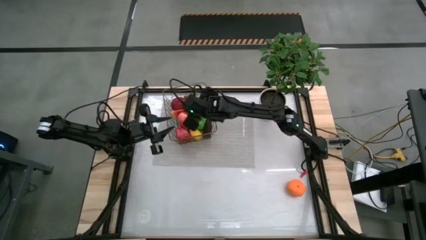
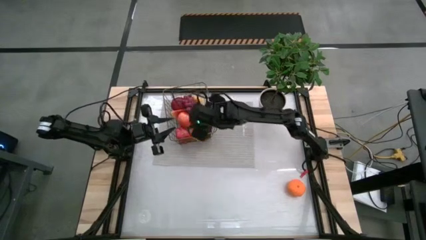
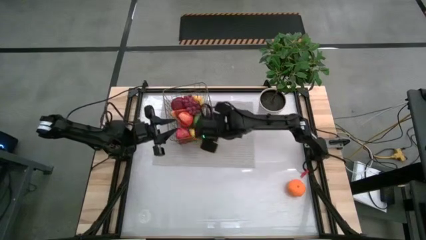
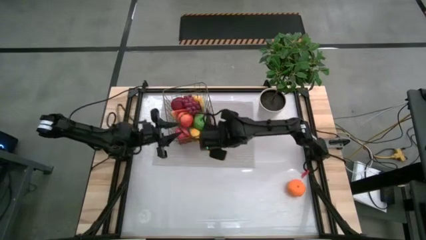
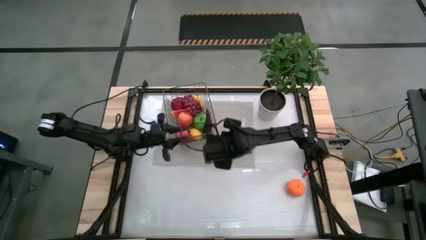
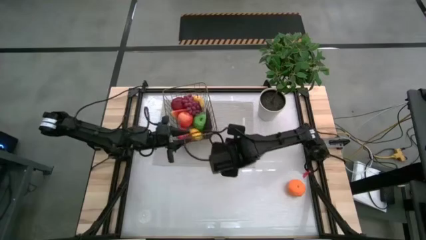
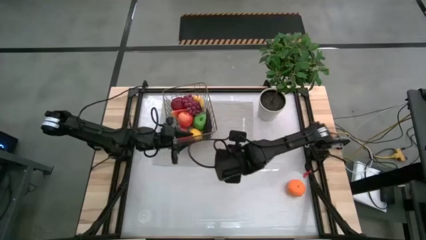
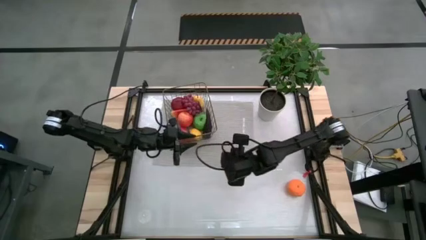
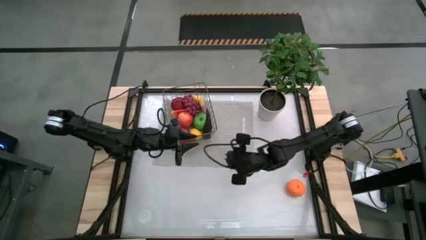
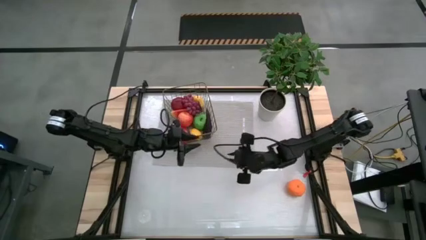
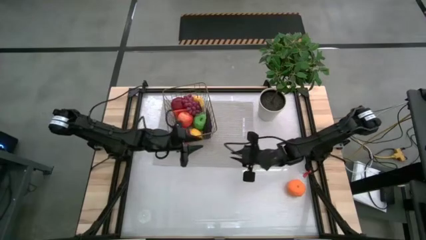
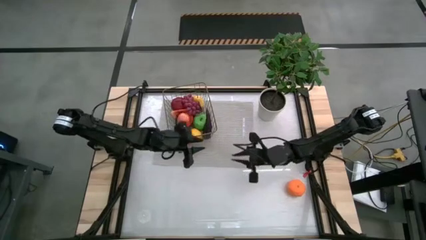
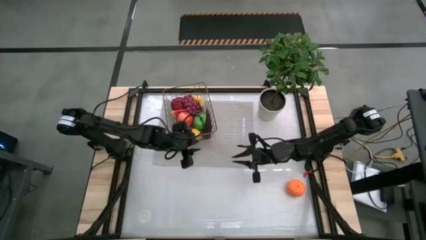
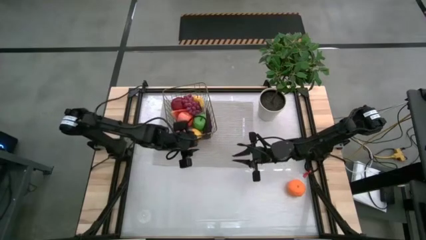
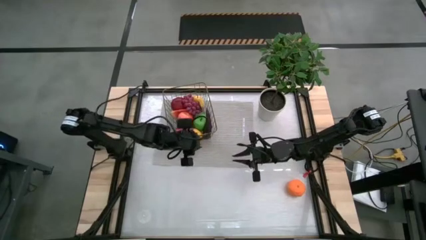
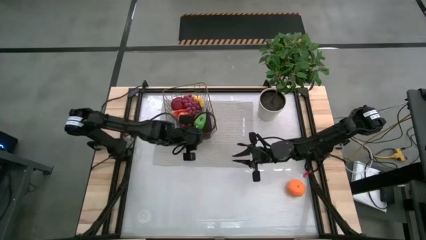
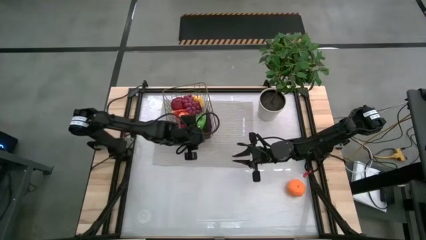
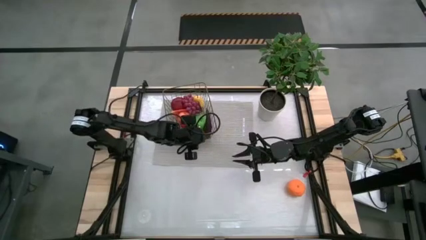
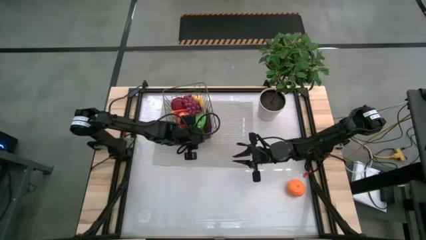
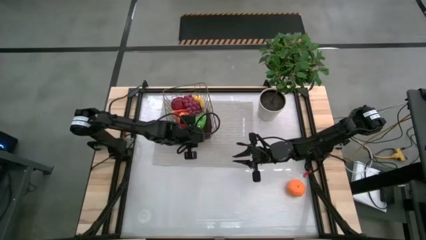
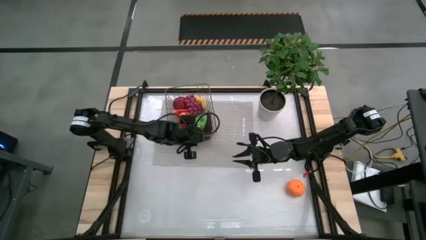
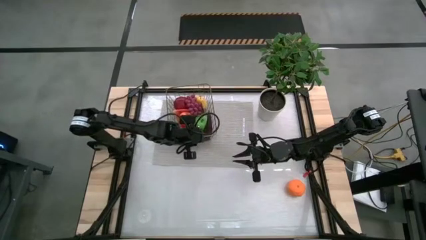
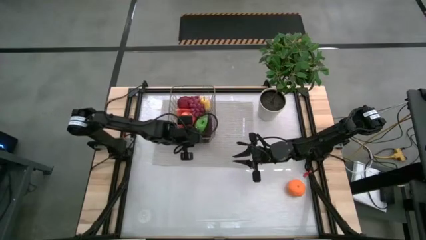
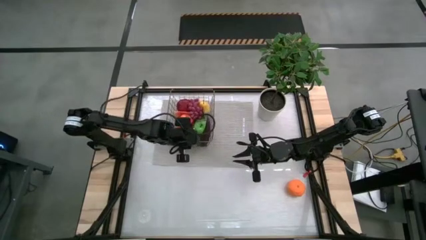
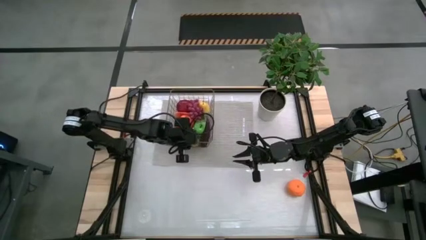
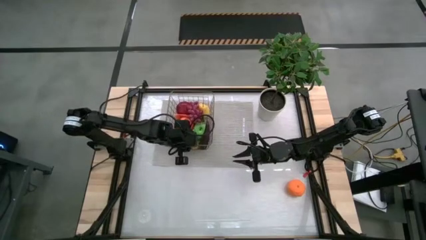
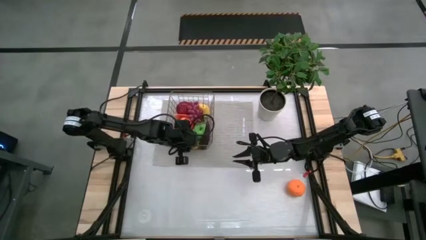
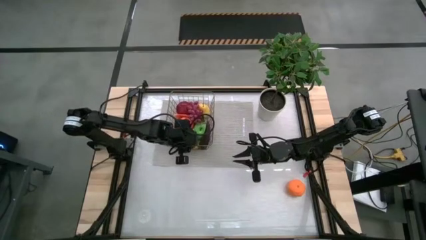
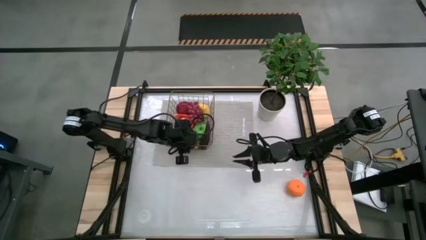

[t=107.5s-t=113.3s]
Task: Build produce basket
Adjust the brown wire basket on the gray mat

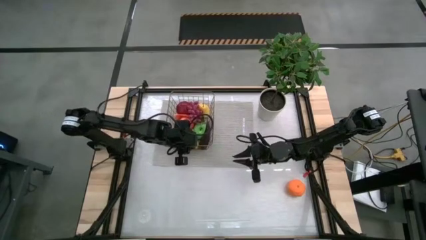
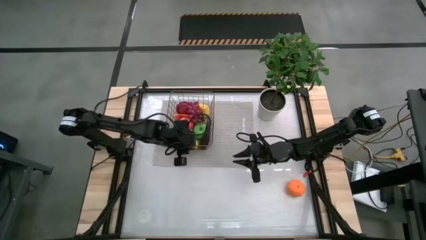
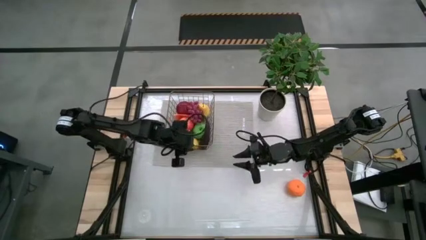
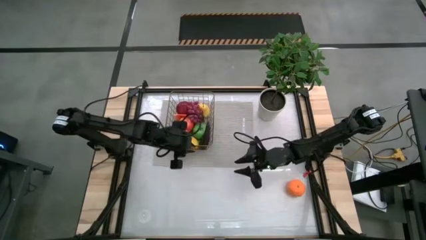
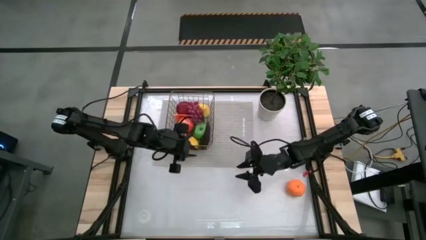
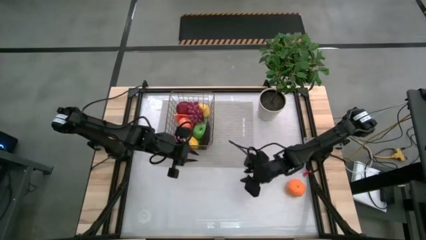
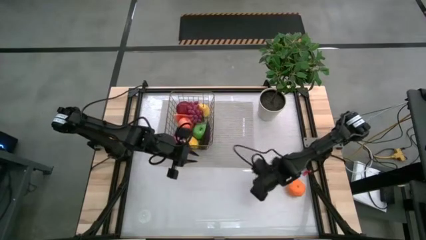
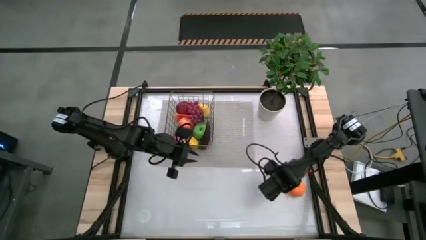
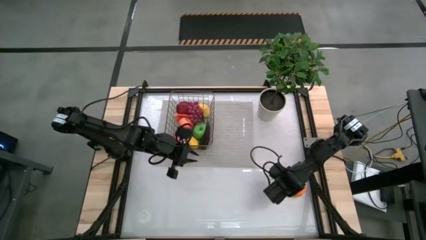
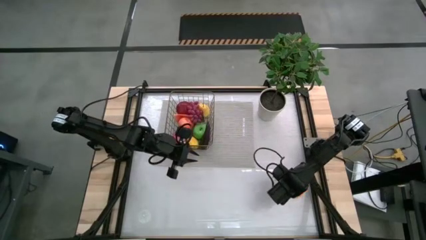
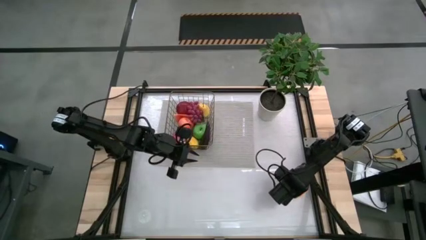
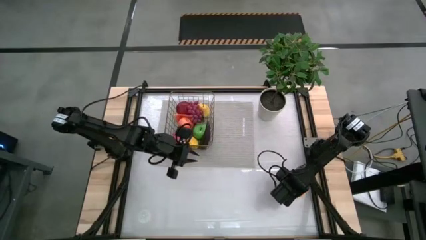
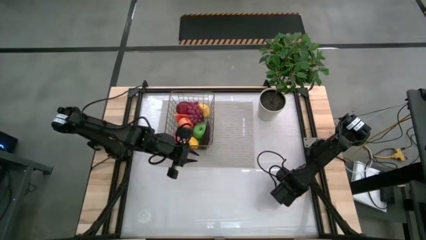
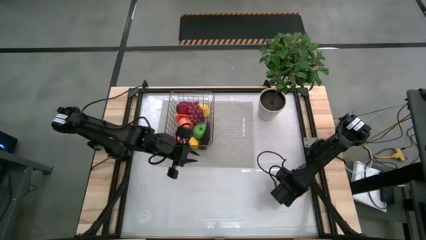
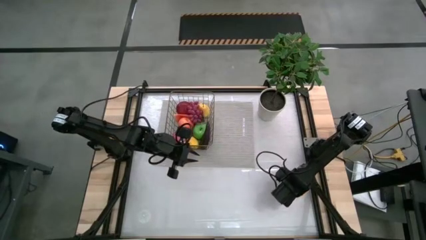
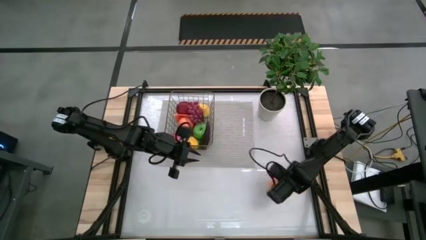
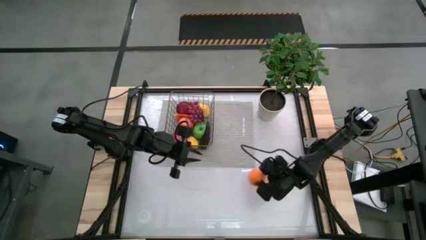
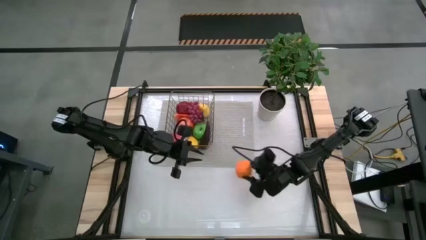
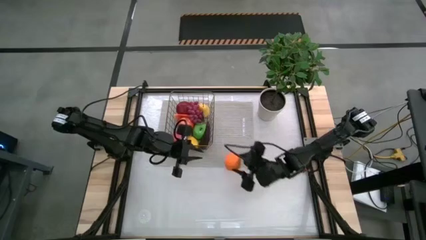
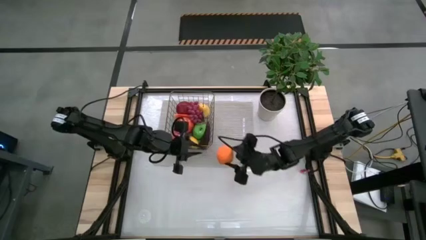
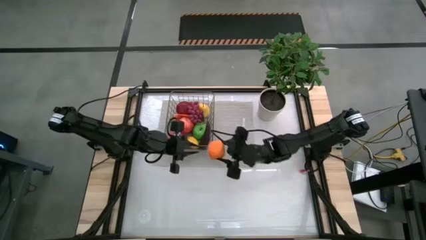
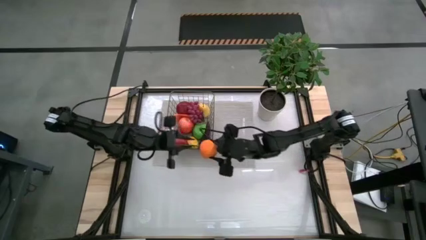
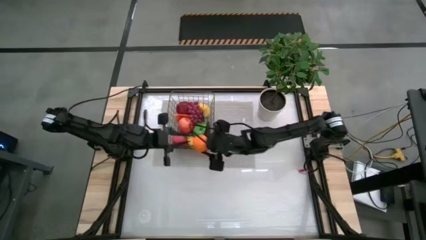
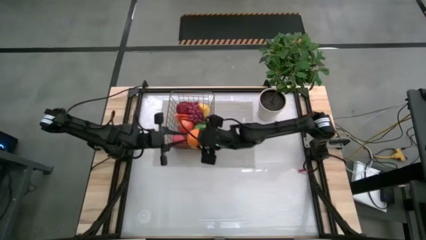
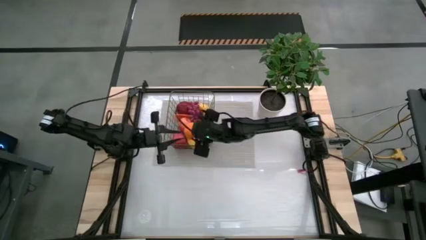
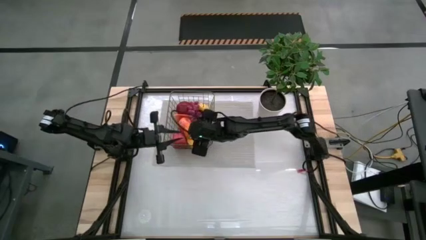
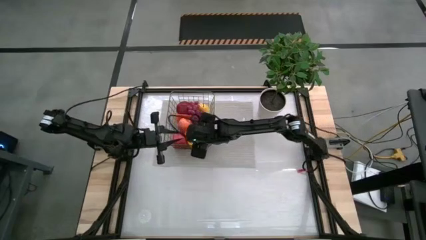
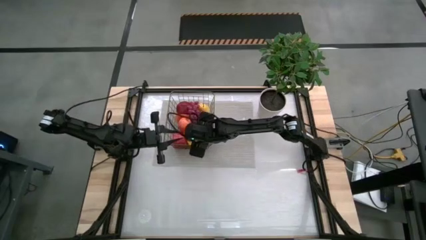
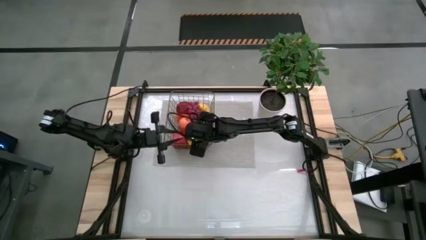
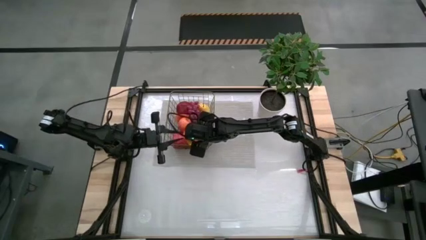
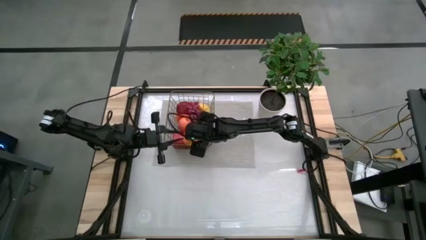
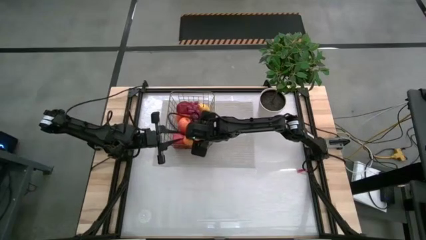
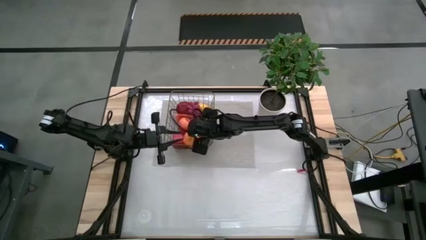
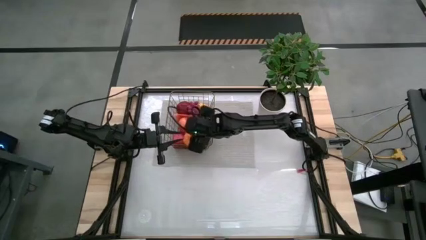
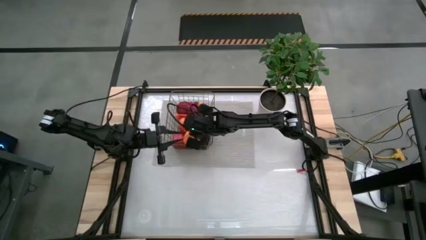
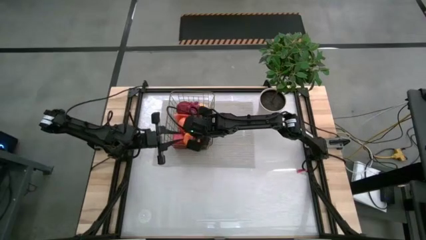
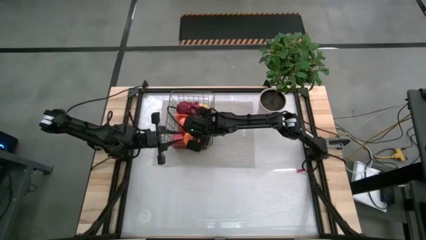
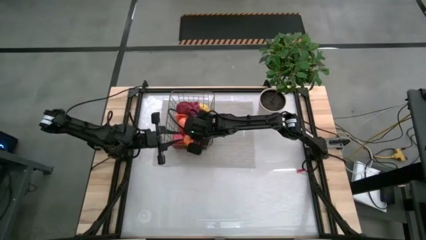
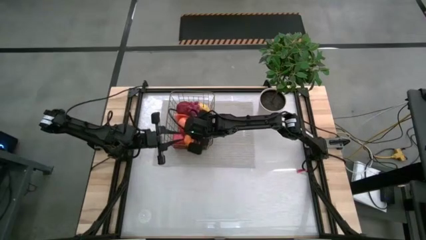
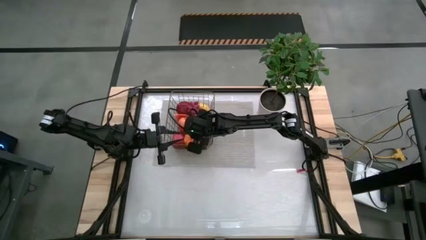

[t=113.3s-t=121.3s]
Put the orange into the brown wire basket

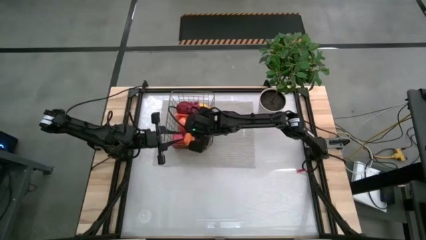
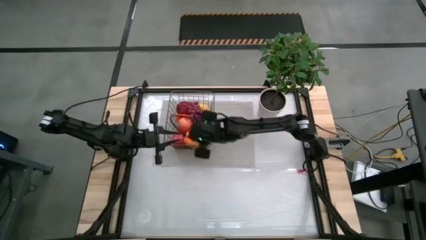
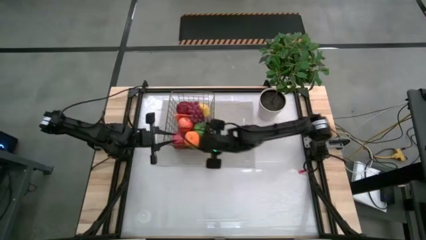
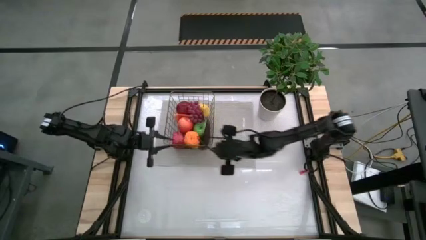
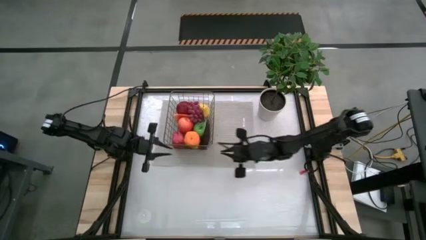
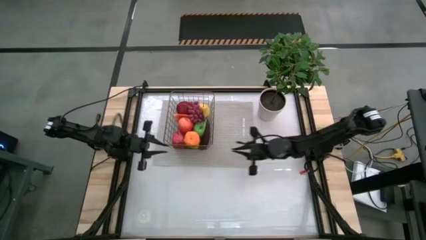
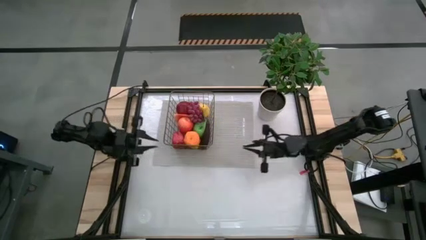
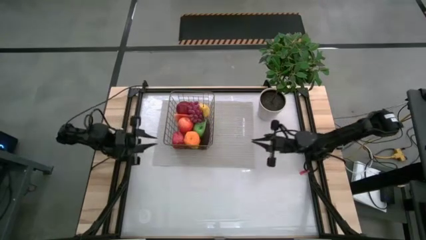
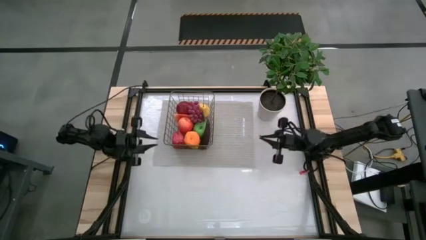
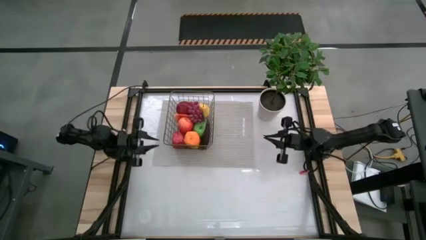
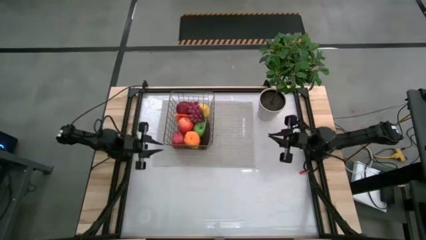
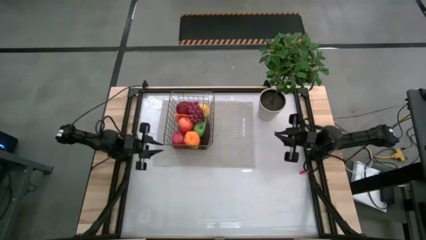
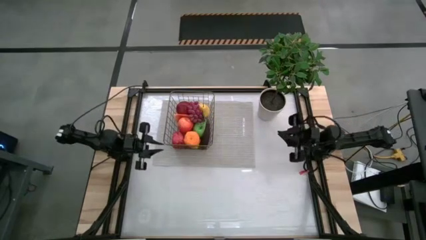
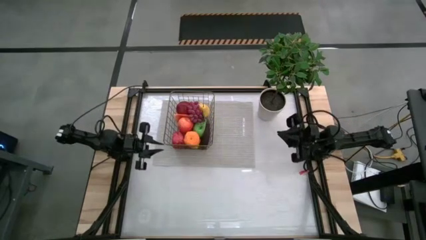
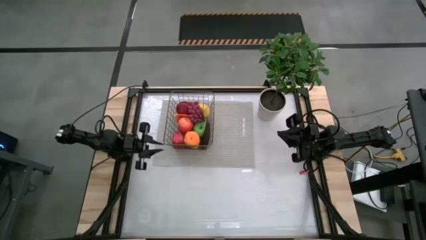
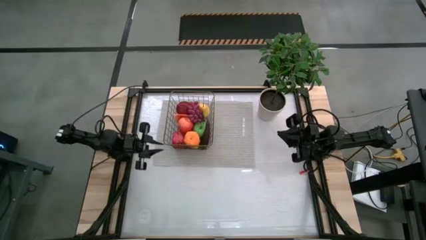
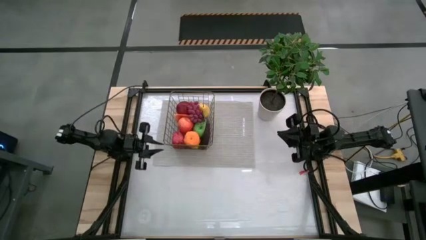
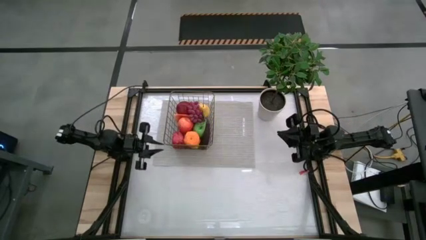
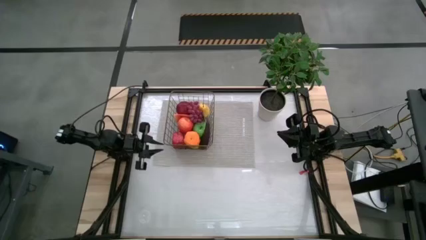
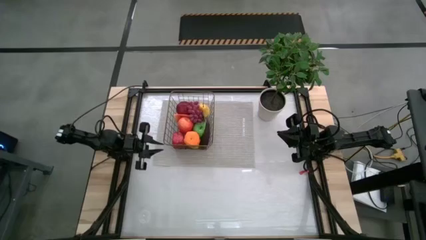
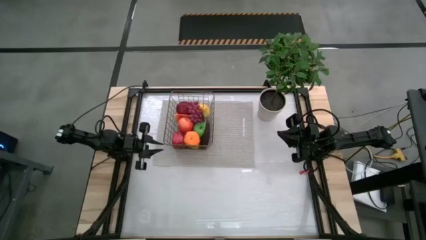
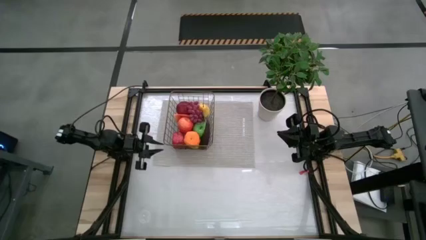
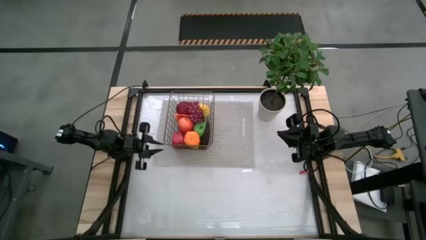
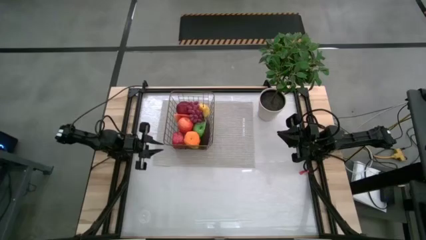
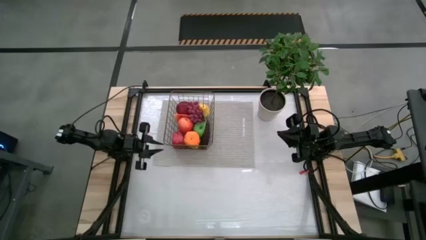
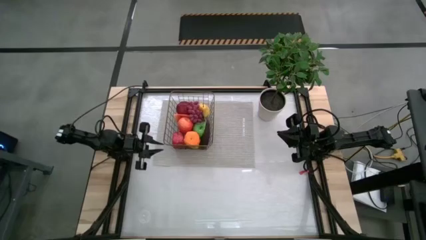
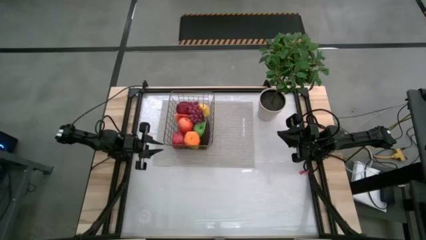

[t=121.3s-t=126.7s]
Return to Home Position
